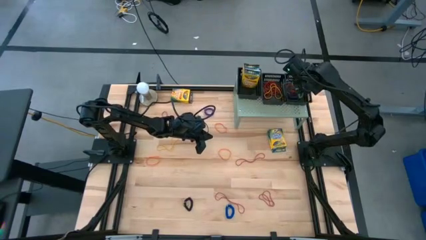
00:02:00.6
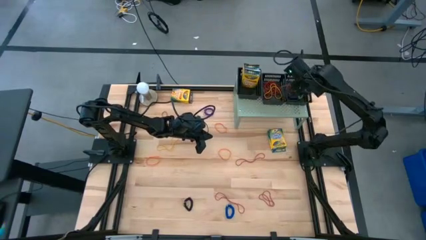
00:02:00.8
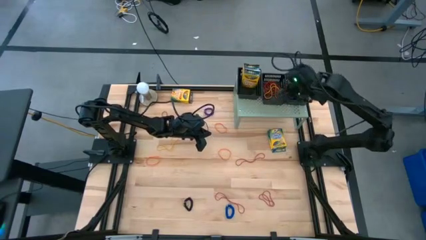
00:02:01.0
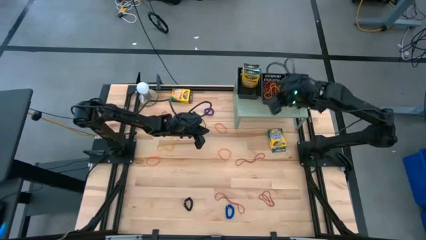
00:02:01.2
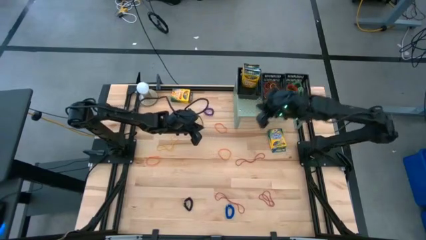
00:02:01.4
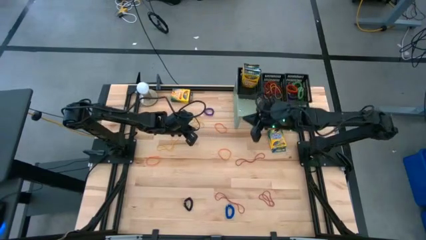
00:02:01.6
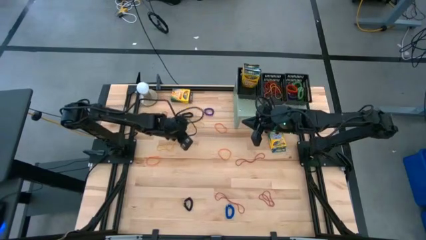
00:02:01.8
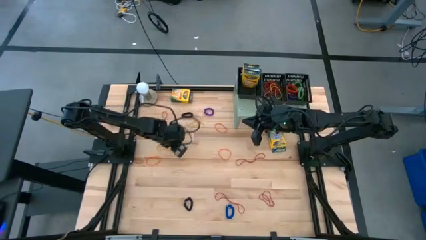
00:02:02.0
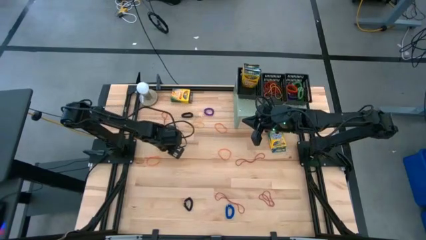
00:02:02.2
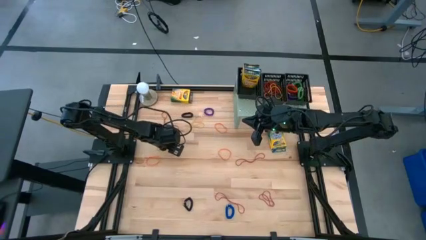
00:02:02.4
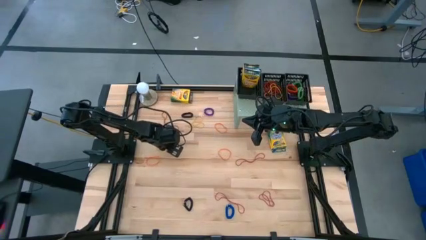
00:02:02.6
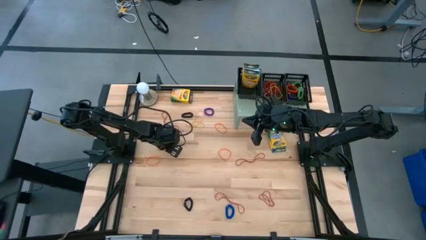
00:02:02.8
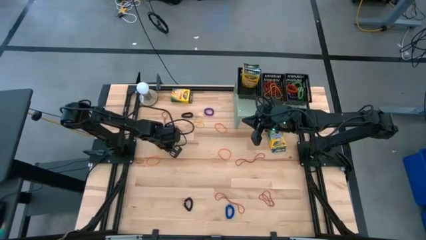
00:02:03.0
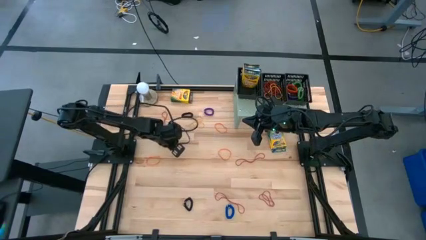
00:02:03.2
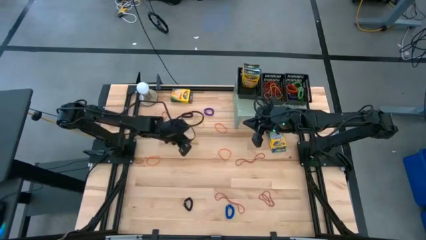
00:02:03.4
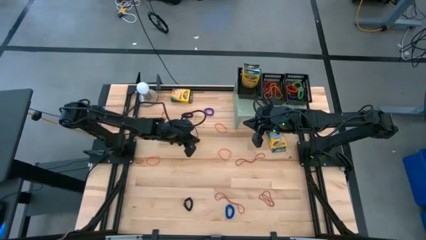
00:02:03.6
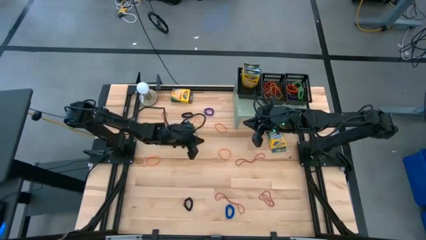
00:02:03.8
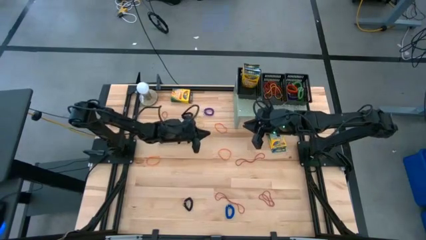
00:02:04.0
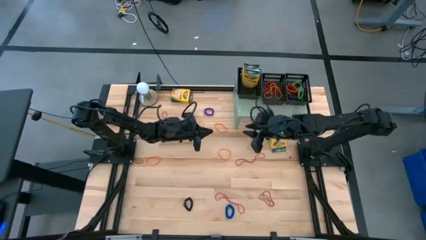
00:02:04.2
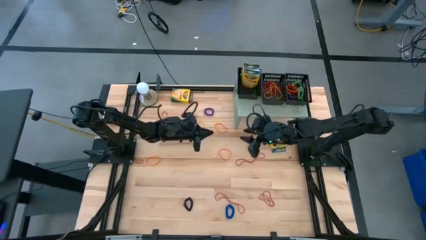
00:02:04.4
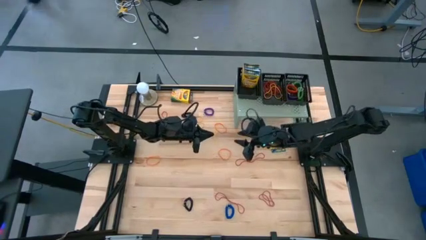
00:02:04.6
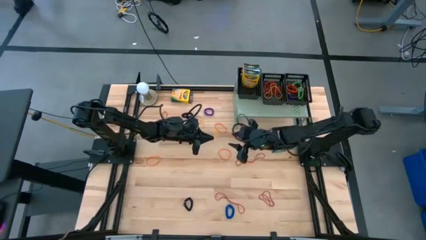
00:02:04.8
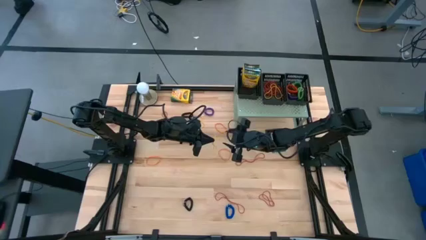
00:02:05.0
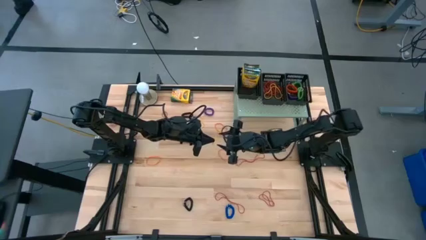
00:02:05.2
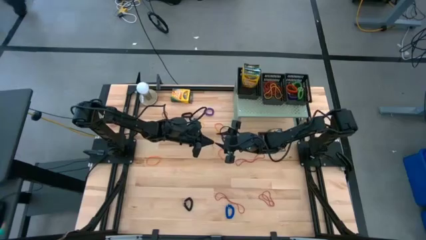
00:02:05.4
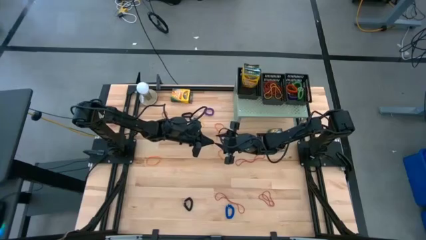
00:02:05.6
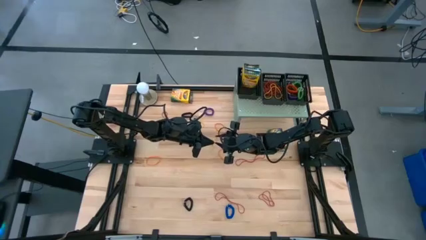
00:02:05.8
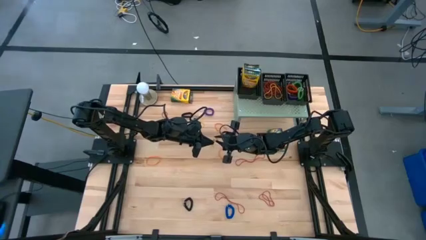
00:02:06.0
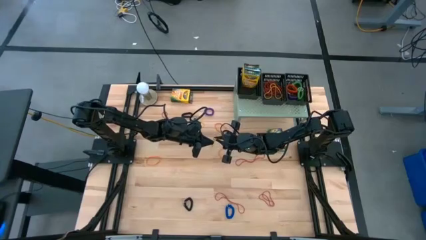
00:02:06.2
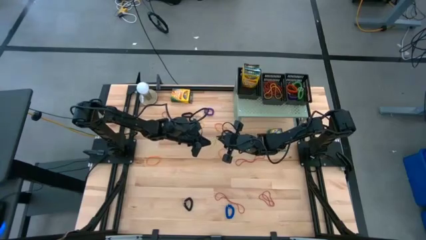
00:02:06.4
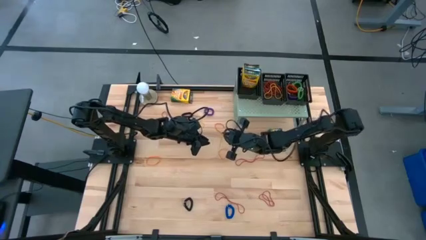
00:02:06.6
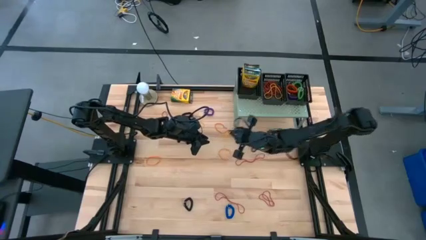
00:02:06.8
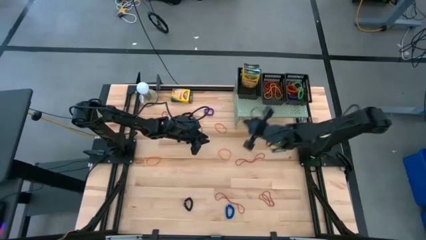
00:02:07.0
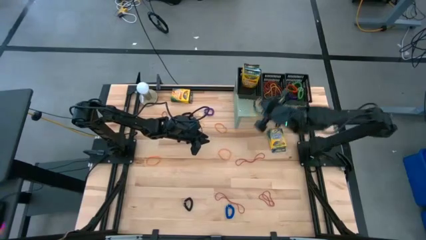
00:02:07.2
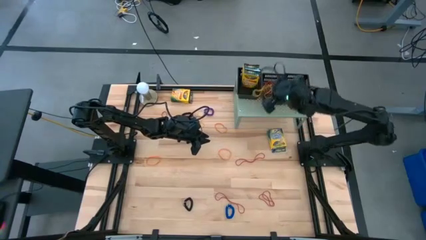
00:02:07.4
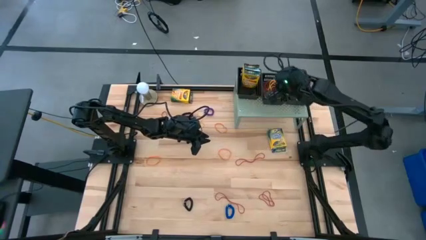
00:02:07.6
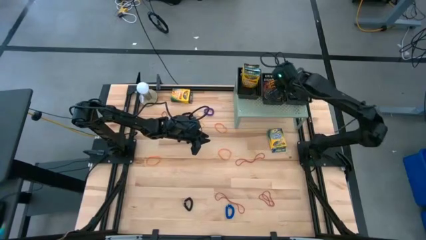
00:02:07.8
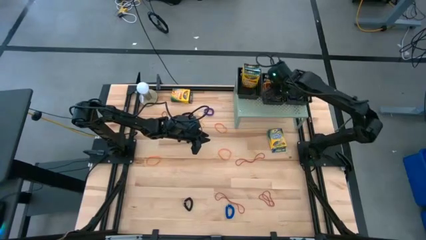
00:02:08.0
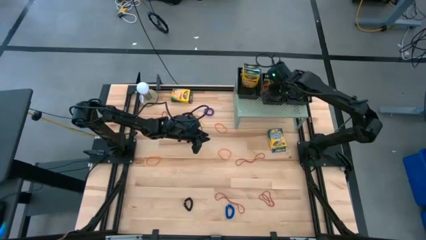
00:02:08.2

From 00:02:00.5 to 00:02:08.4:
Task: Pick & Place Office Desk Supplies
Put the bottom yellow rubber band into the middle black basket on the shelf

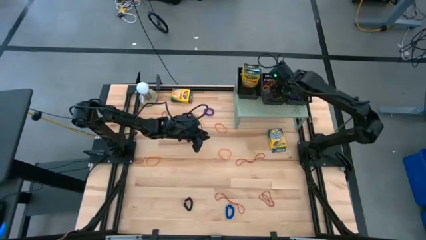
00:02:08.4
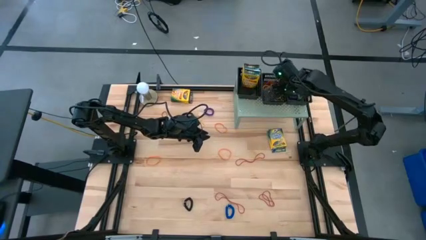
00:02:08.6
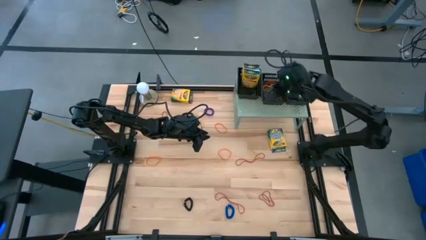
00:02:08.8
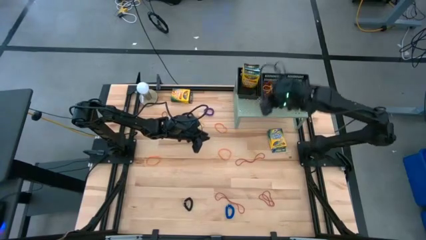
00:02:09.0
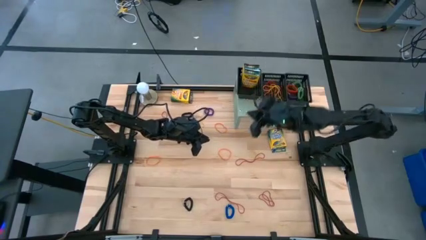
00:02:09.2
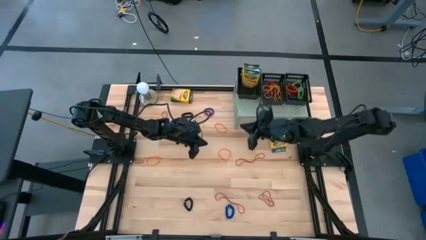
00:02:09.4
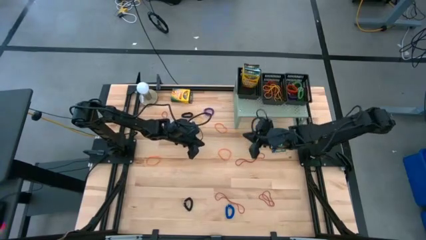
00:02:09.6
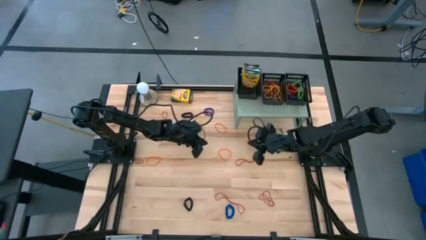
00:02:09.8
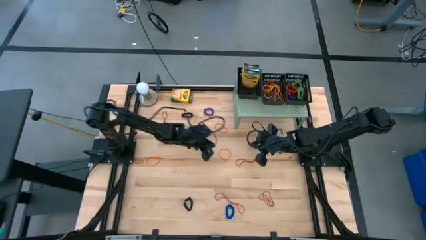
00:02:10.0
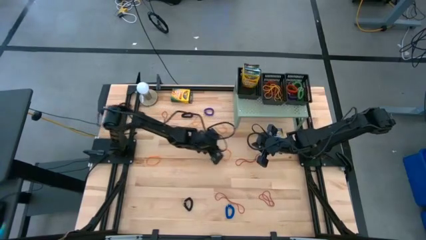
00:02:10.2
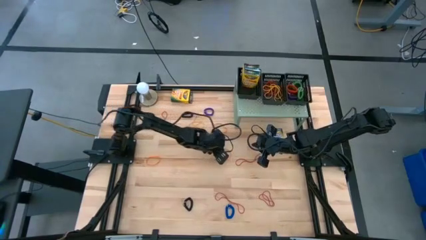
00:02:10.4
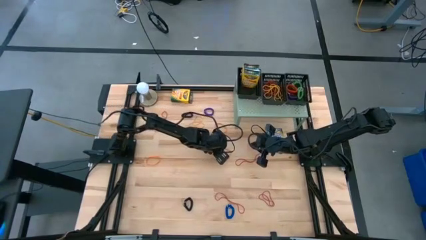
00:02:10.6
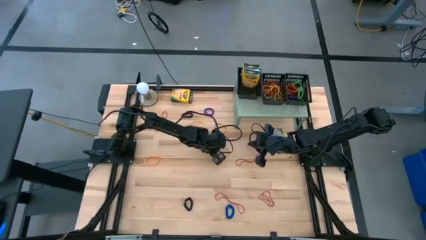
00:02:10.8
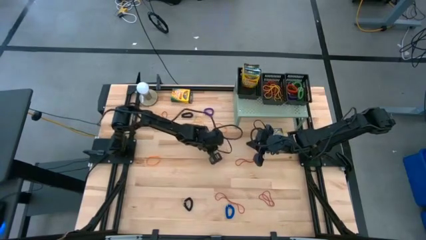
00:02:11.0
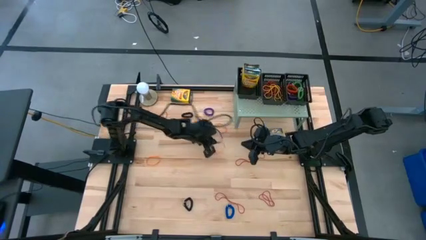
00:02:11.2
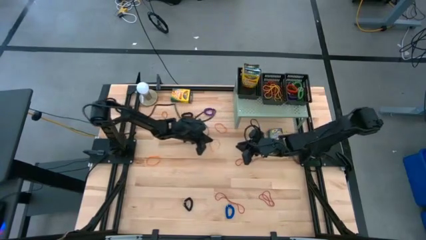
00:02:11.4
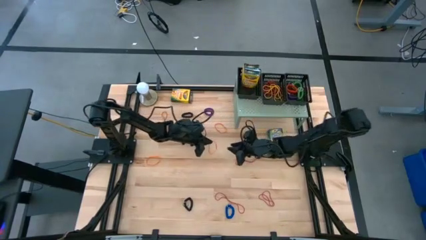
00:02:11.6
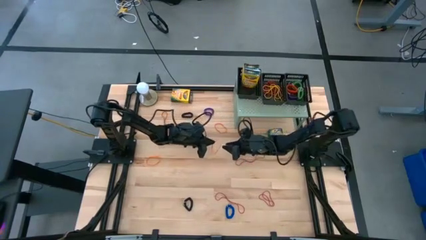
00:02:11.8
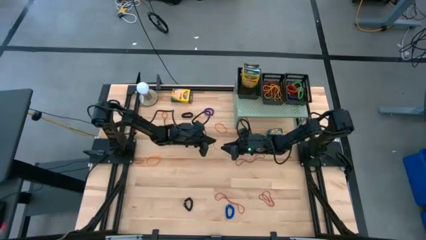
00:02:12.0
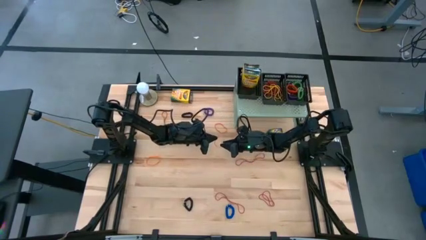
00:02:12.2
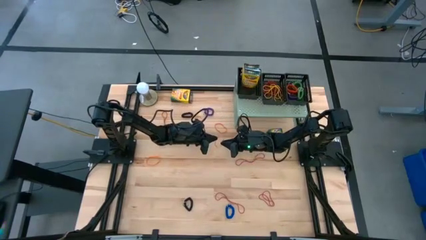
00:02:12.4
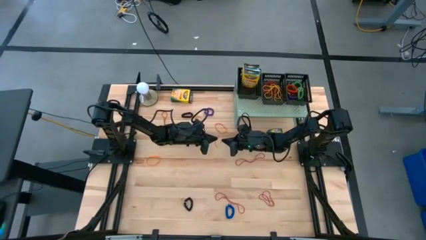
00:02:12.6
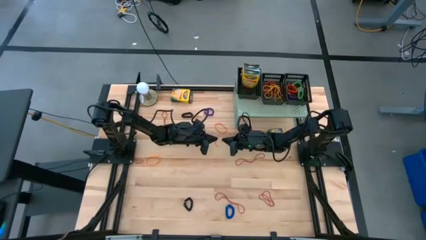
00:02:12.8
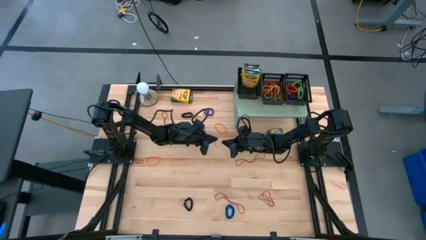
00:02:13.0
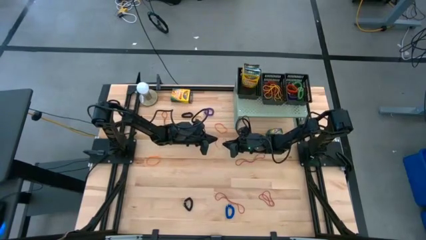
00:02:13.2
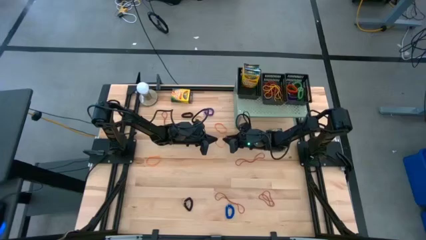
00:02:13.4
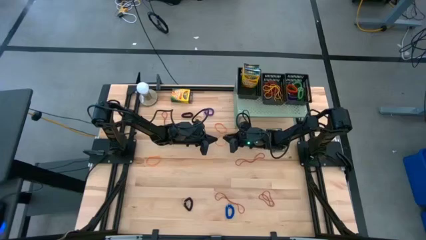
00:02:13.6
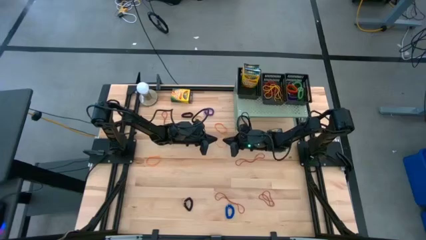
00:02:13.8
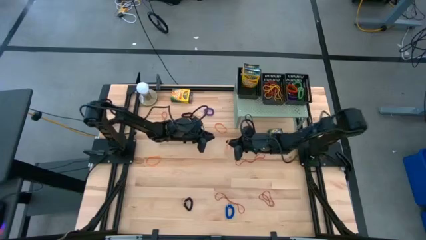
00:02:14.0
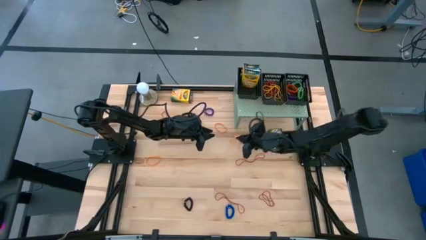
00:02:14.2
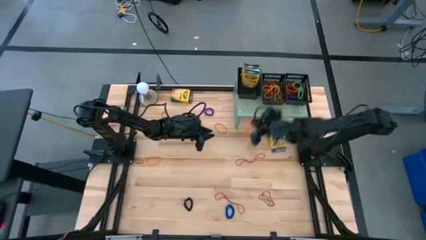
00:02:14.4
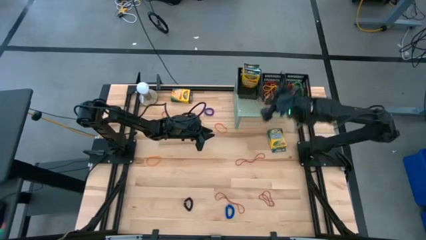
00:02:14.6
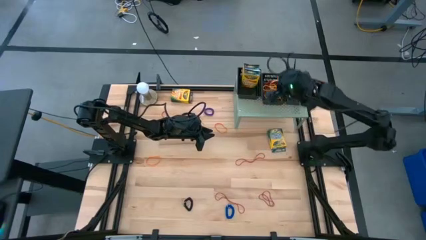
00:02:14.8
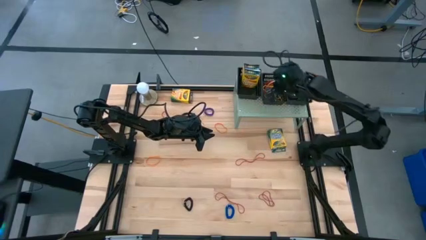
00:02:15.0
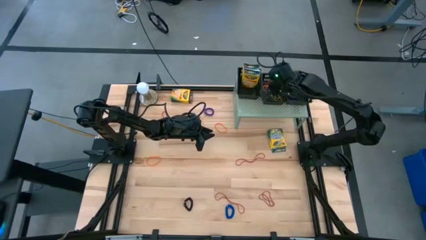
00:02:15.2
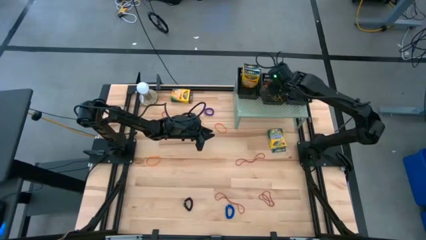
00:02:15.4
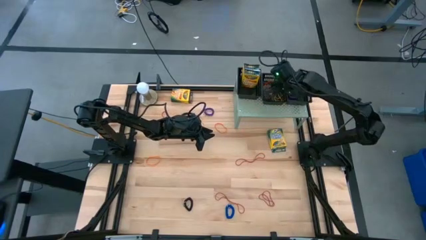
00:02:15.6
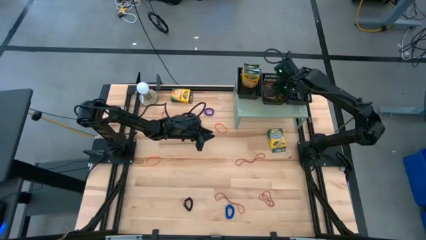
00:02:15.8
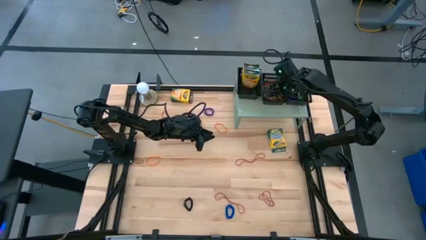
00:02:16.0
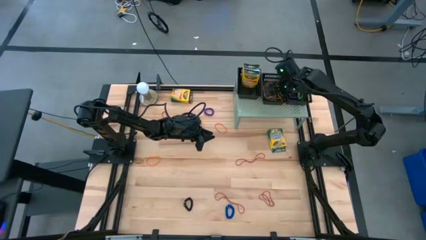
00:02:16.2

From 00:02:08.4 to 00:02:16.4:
Put the bottom right orange rubber band into the middle black basket on the shelf
